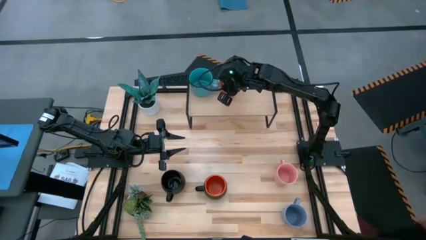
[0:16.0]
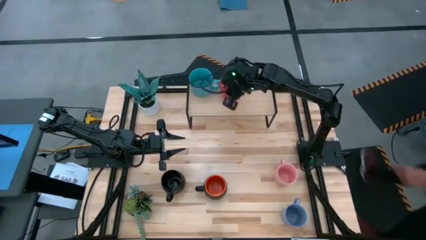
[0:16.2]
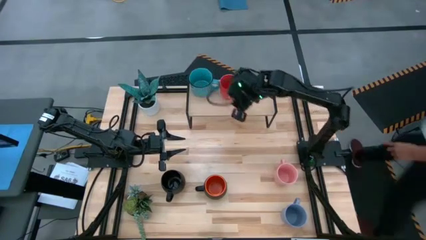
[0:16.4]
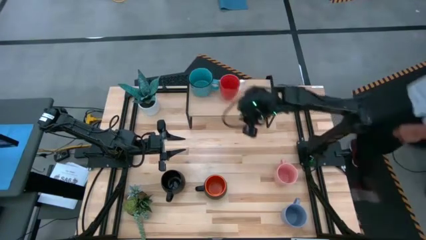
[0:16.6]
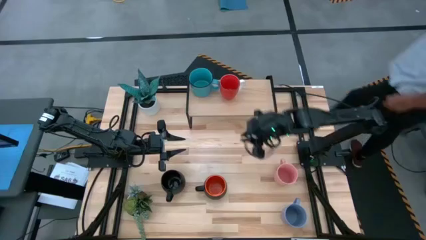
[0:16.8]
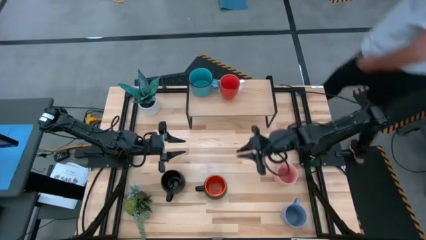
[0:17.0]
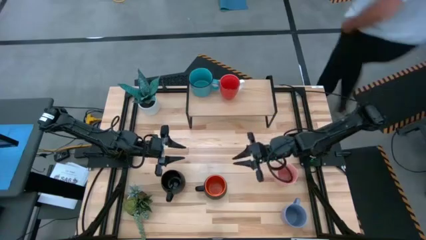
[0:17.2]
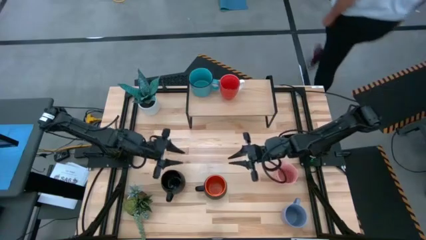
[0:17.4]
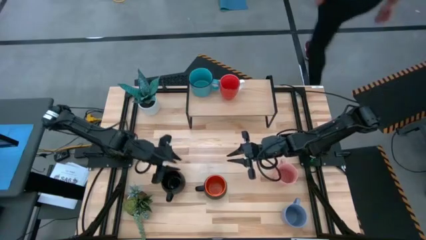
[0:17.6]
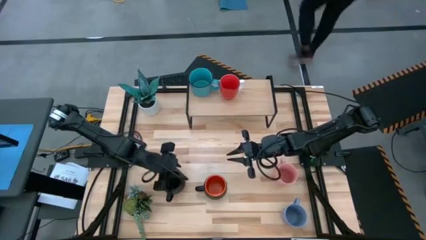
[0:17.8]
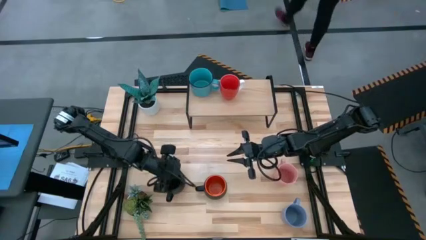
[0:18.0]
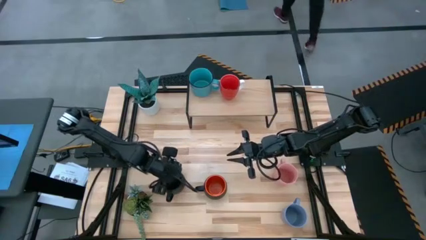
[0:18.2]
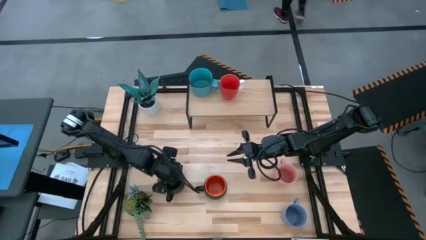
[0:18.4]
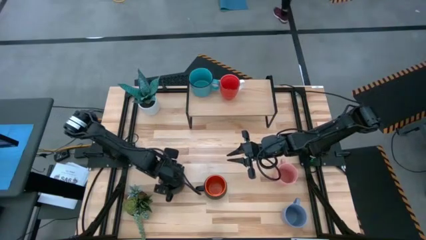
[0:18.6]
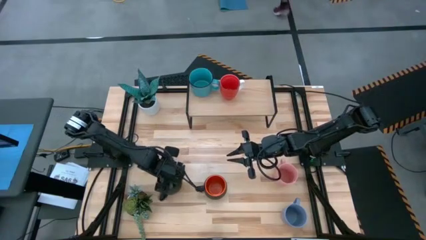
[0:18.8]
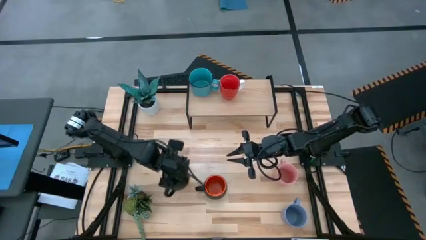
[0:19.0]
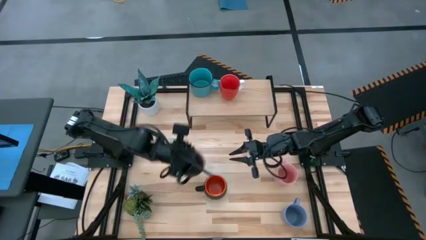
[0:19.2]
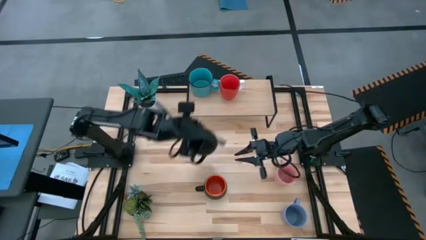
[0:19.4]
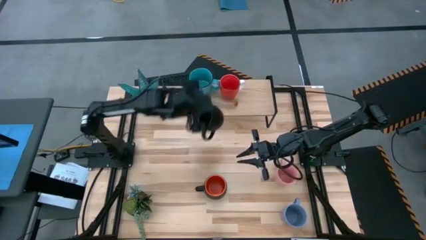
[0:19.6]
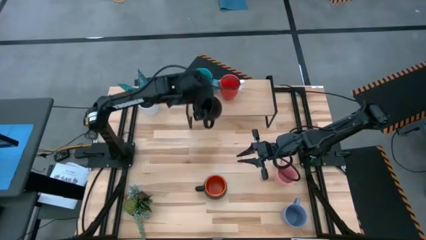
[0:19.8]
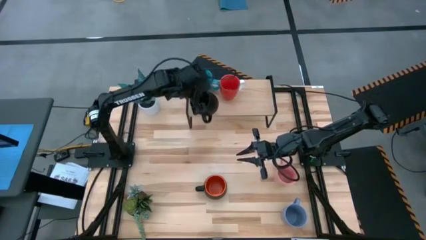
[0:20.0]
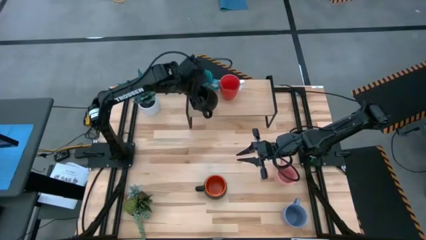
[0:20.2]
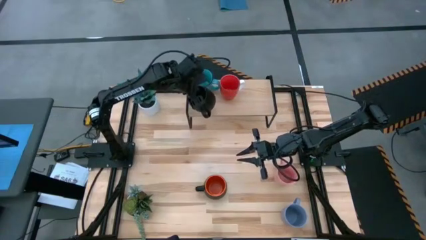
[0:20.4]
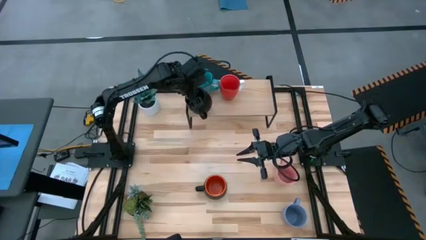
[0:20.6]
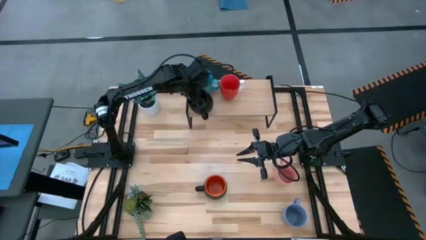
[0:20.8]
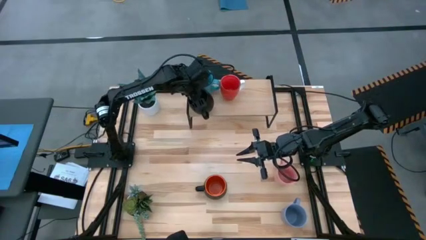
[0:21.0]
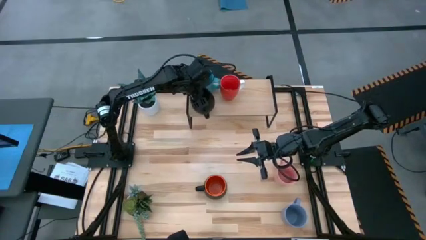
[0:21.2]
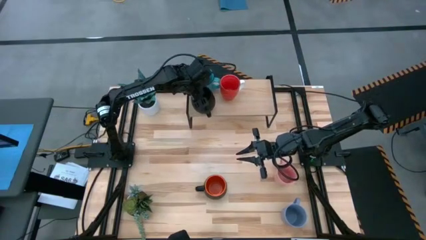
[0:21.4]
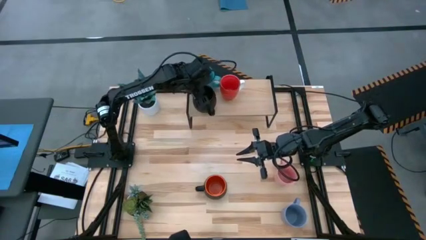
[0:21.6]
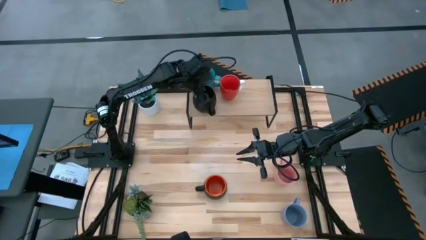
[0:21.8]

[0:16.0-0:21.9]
Task: Place coffee mugs
Put the black mug on the shelf

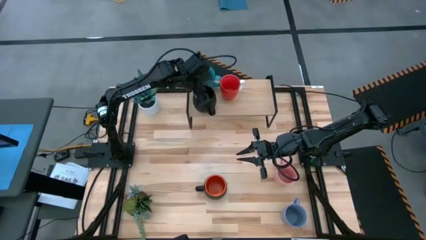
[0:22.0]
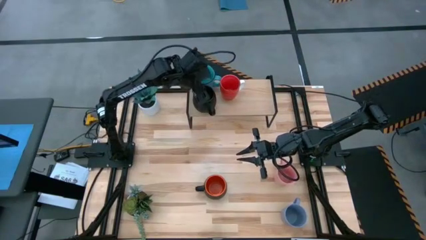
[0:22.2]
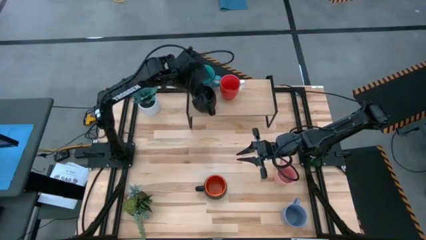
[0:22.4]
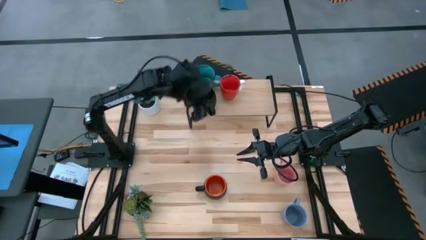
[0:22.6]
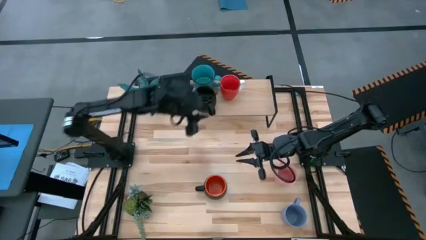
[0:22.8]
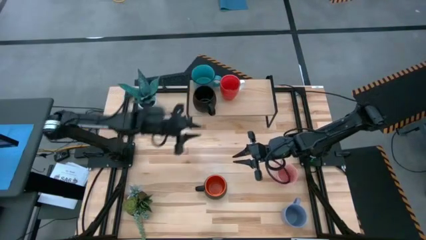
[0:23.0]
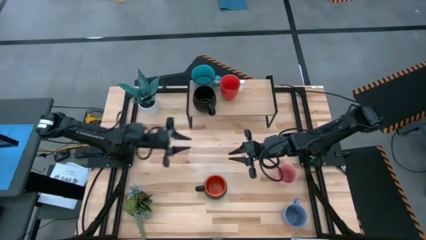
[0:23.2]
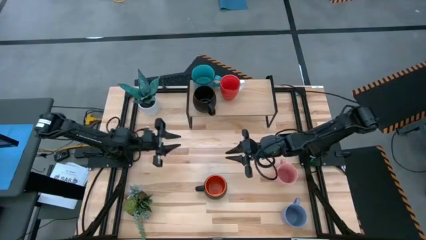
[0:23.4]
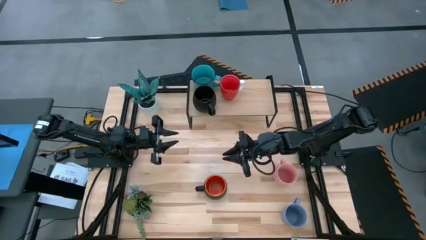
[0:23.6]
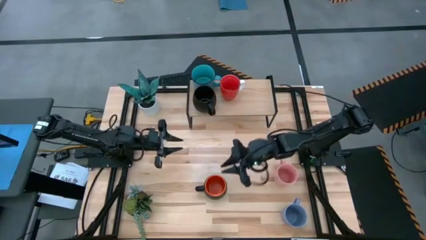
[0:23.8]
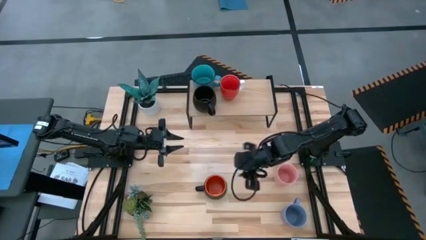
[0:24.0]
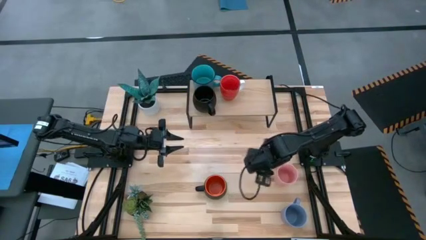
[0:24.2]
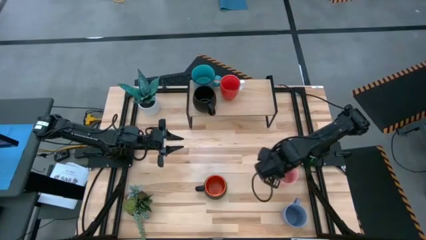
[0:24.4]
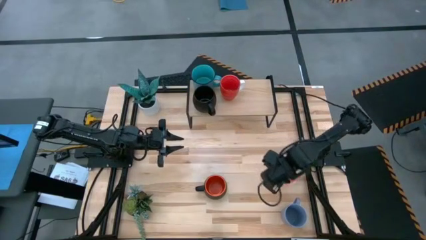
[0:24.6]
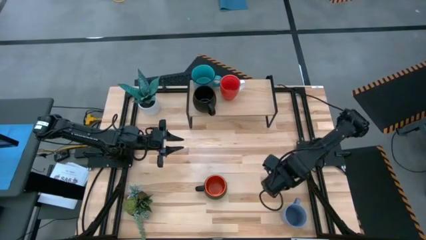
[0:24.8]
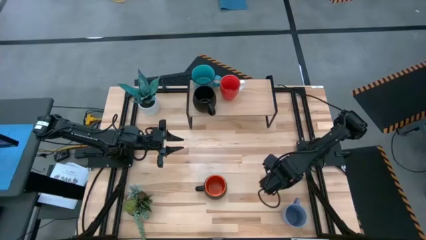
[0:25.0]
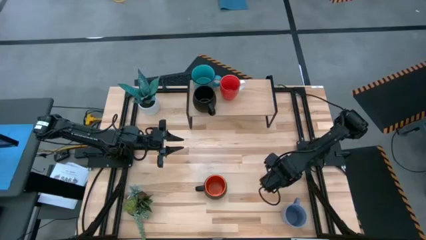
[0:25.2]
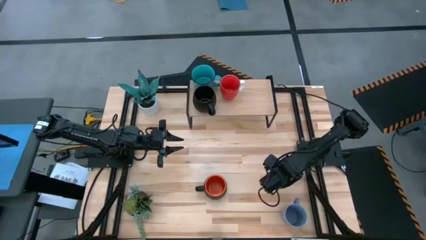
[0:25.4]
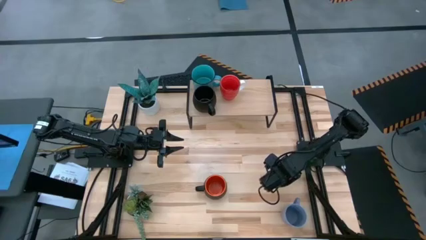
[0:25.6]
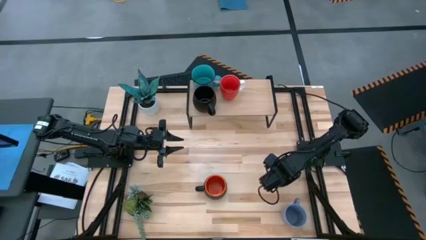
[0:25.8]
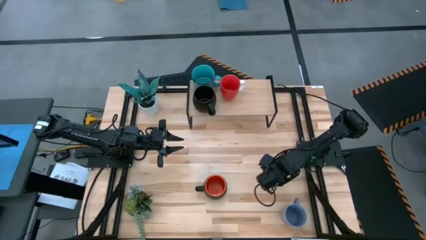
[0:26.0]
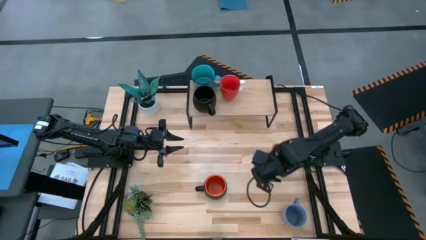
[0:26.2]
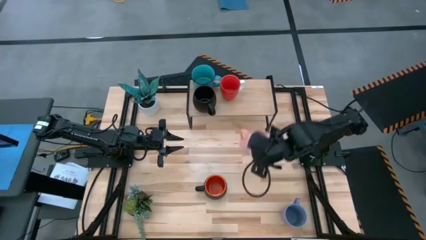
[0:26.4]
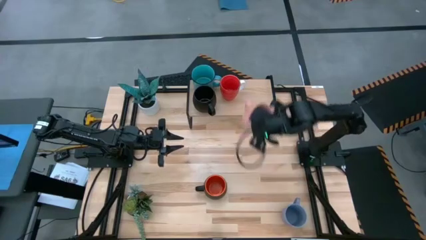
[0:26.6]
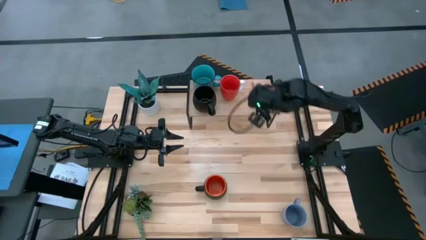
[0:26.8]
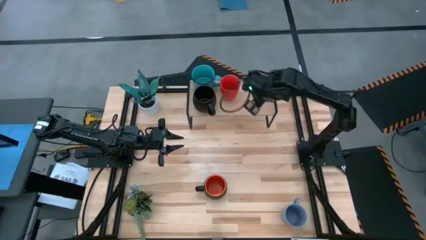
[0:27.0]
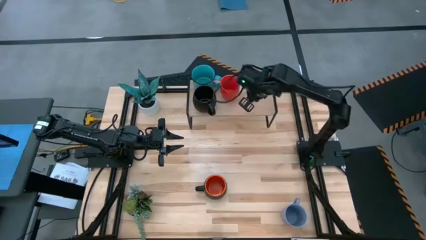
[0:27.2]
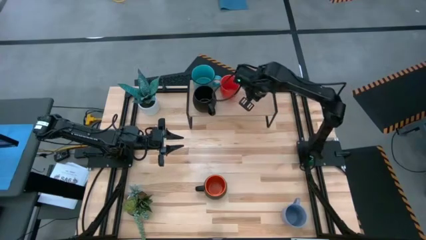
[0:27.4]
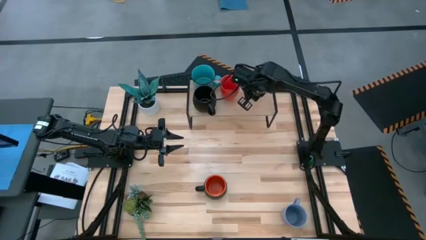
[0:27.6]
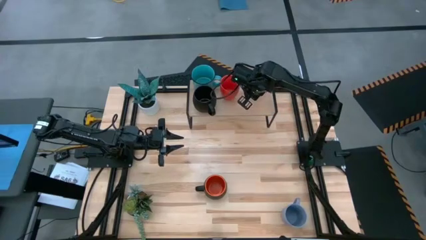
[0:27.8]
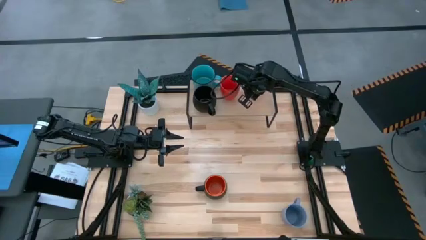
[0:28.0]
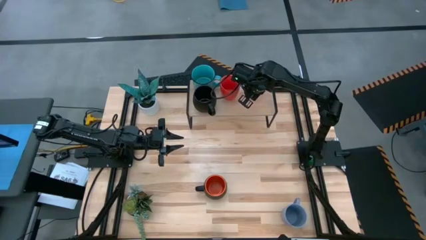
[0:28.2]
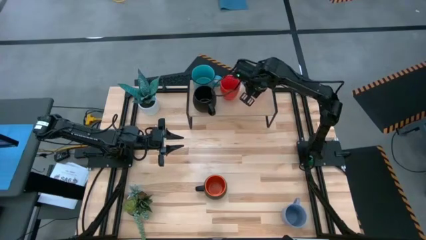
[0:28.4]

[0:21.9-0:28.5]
Put the pink mug on the shelf

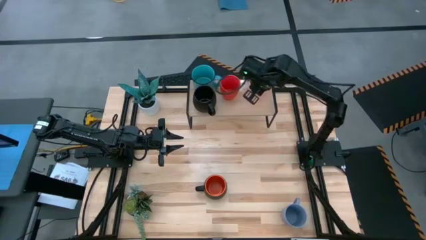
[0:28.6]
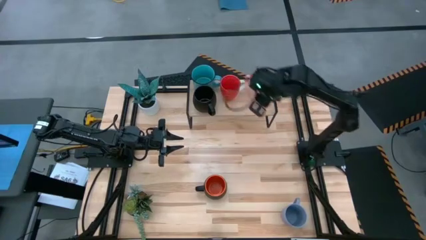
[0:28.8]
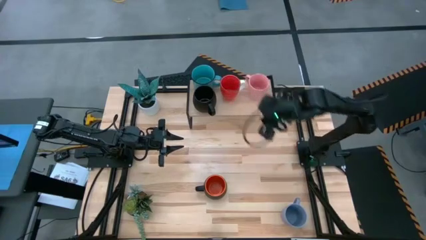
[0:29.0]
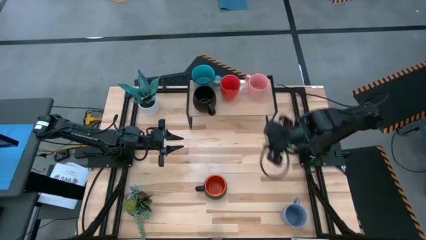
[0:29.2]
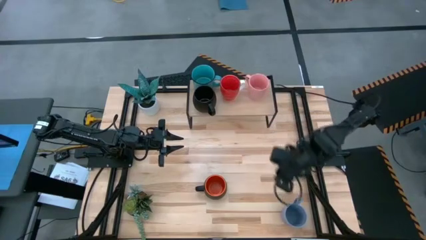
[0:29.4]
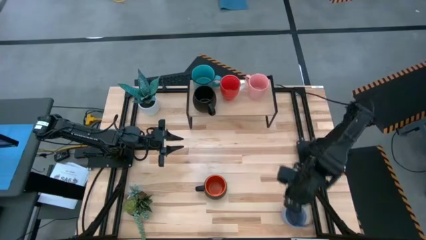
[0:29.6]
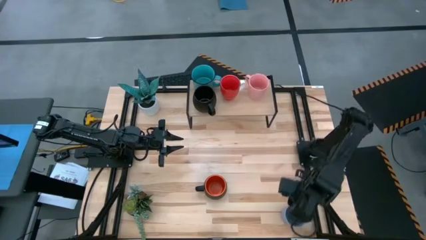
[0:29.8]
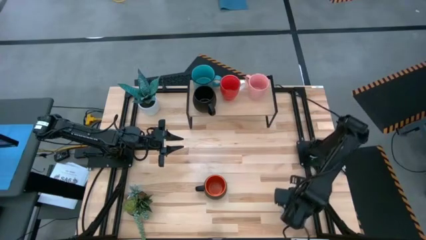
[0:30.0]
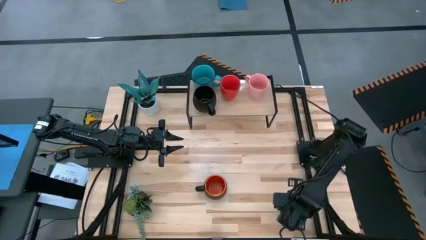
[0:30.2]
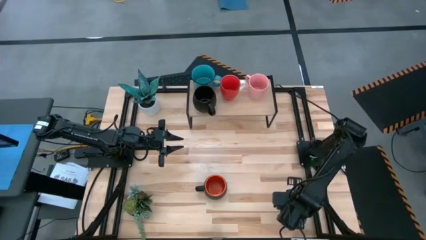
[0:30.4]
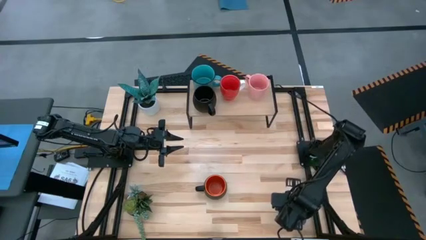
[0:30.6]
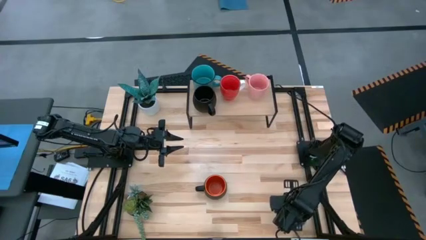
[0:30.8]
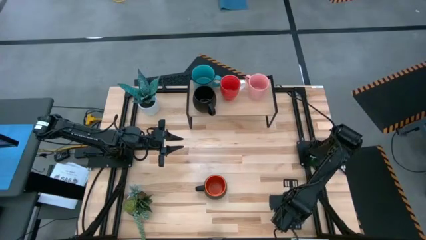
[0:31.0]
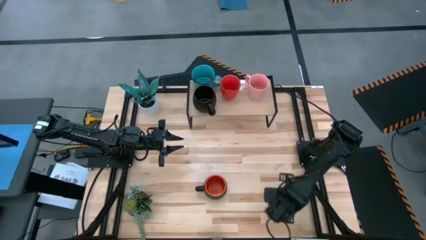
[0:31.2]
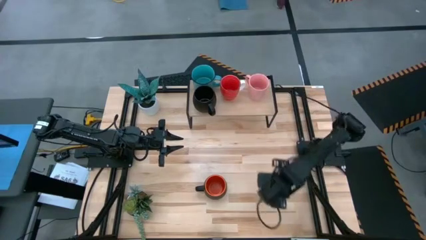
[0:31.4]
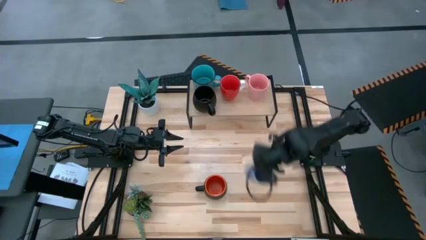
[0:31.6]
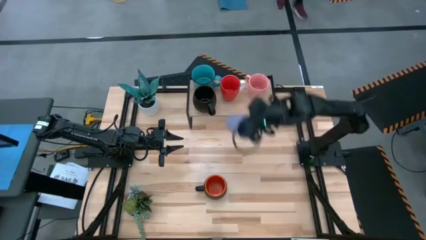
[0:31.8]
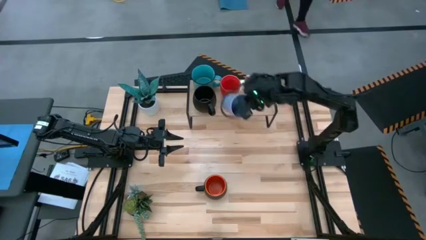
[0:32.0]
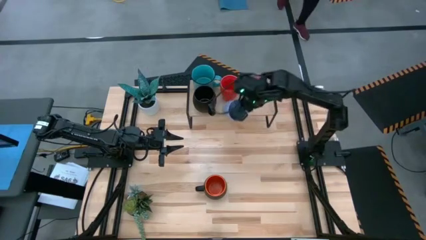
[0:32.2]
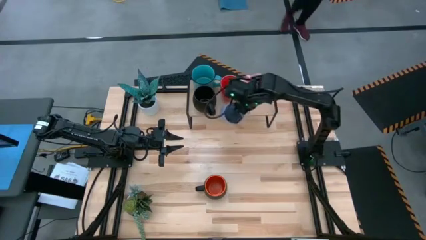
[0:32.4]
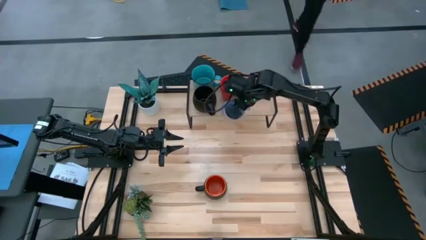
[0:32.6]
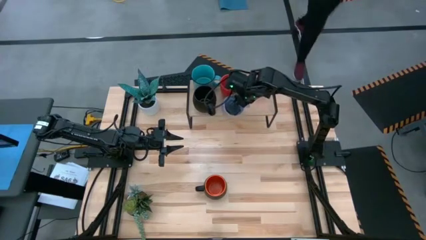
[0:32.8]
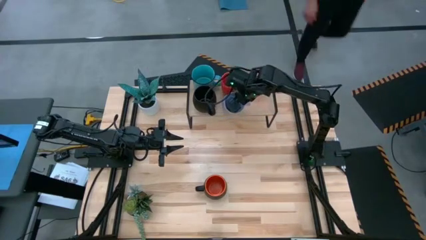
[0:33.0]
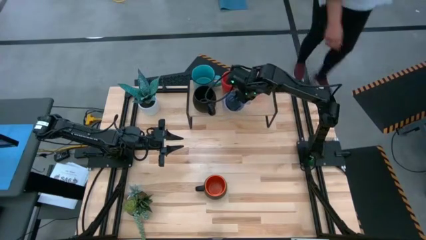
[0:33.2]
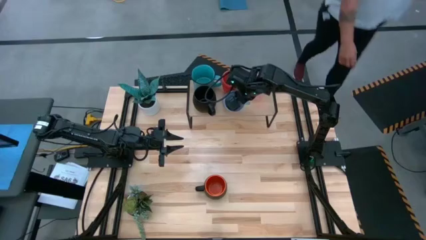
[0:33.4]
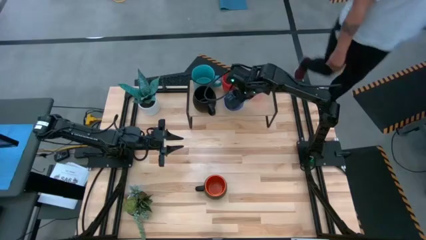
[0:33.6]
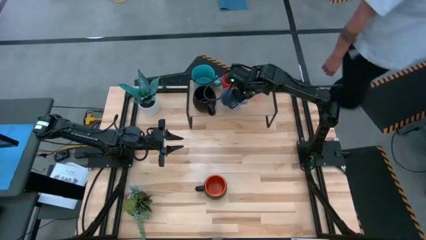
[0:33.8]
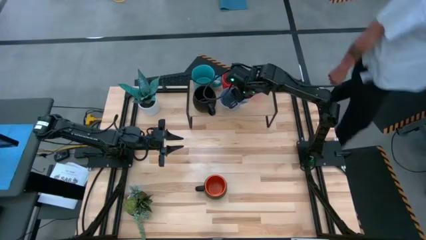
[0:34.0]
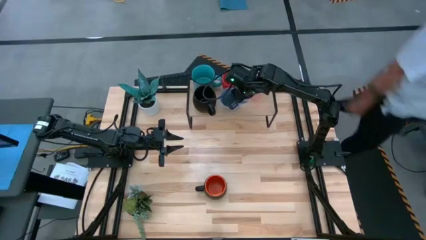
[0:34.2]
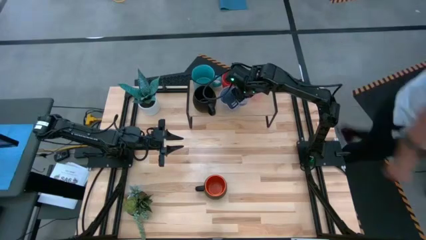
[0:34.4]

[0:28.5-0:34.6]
Put the light blue mug on the shelf
